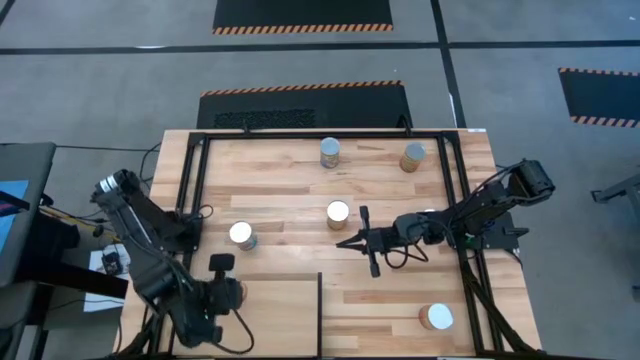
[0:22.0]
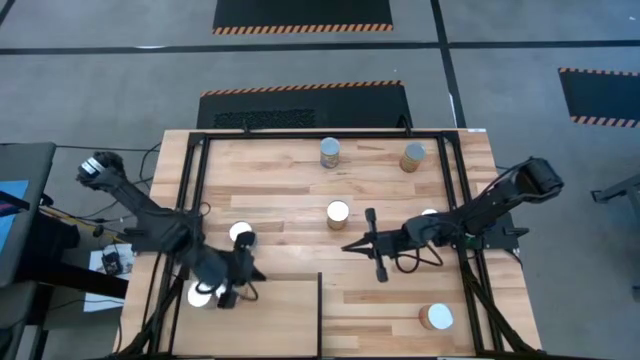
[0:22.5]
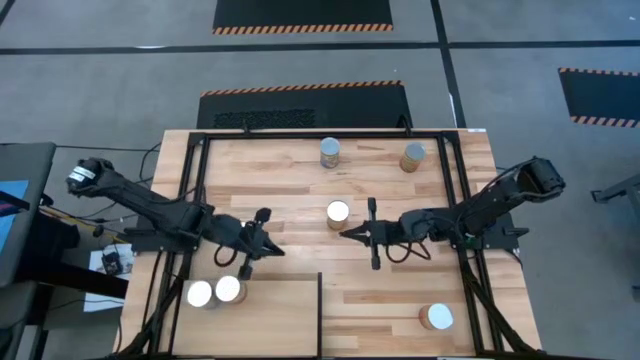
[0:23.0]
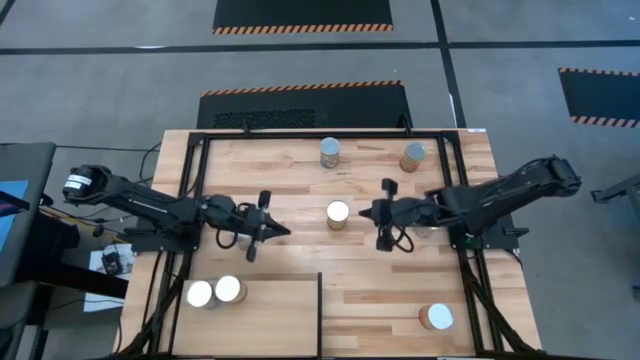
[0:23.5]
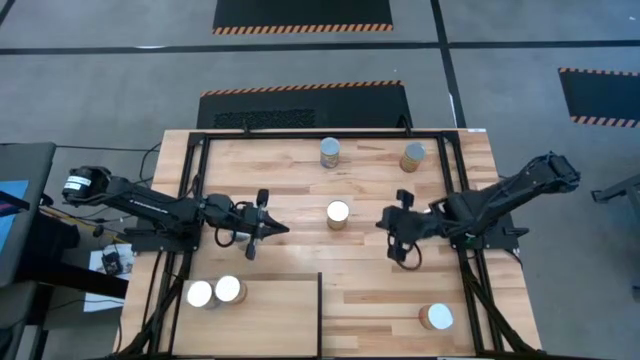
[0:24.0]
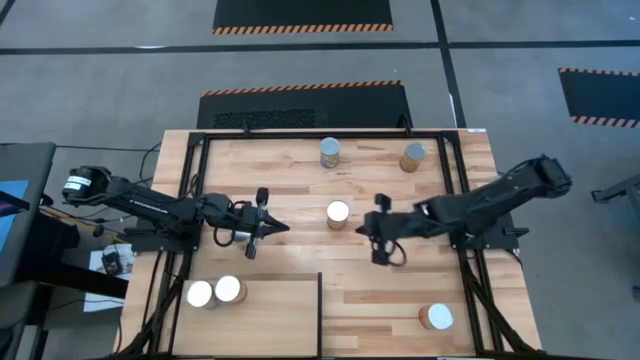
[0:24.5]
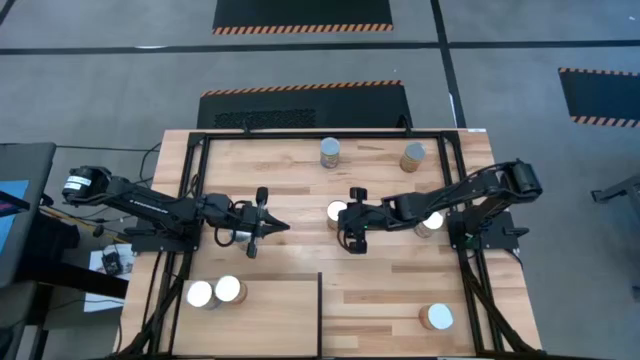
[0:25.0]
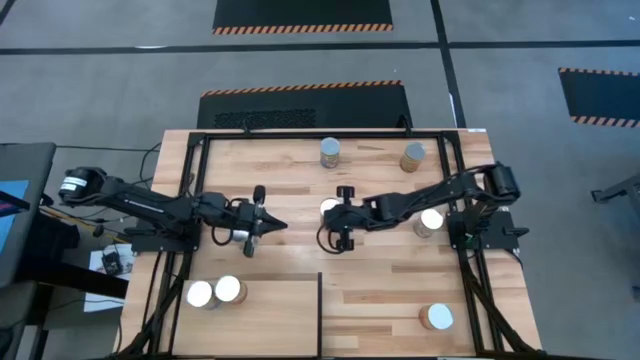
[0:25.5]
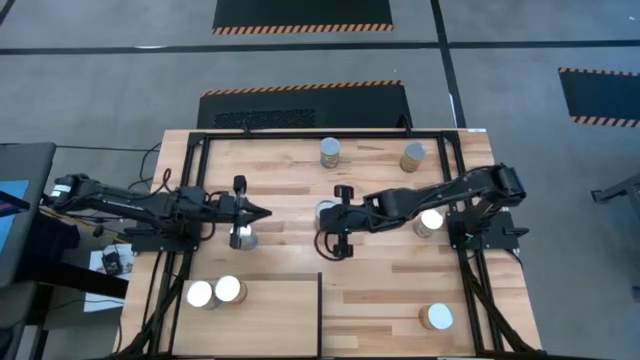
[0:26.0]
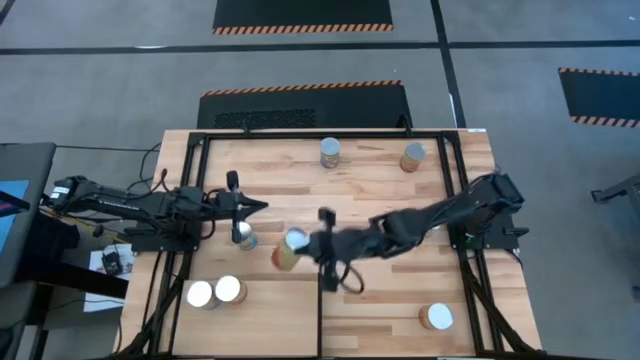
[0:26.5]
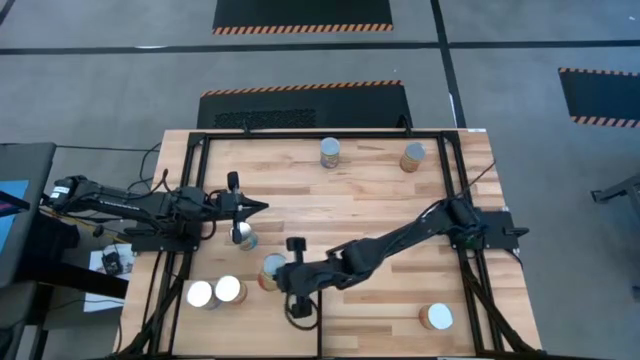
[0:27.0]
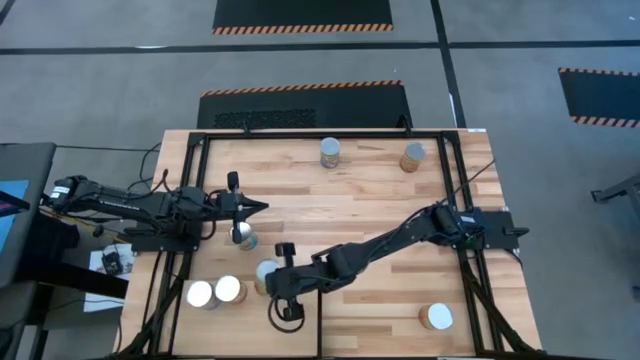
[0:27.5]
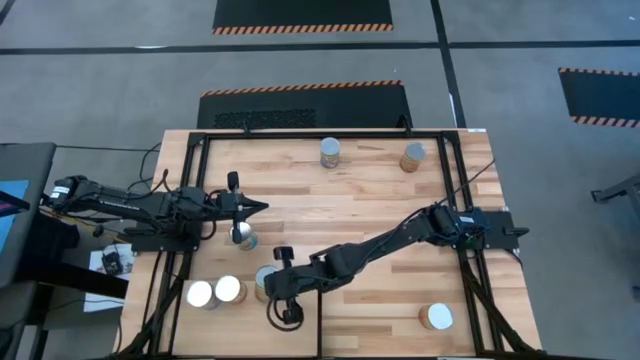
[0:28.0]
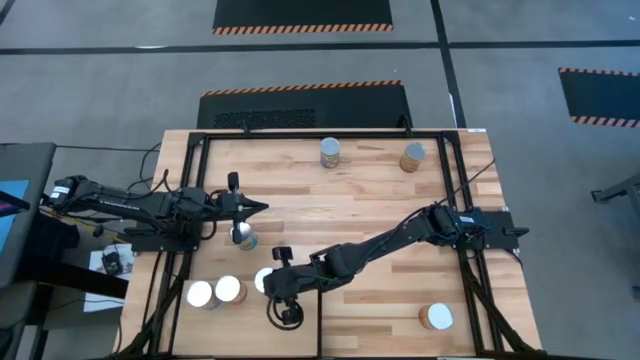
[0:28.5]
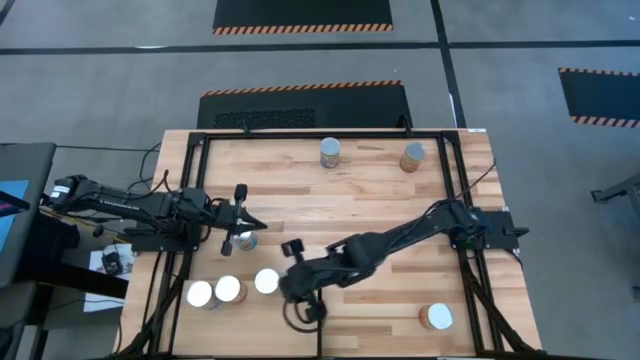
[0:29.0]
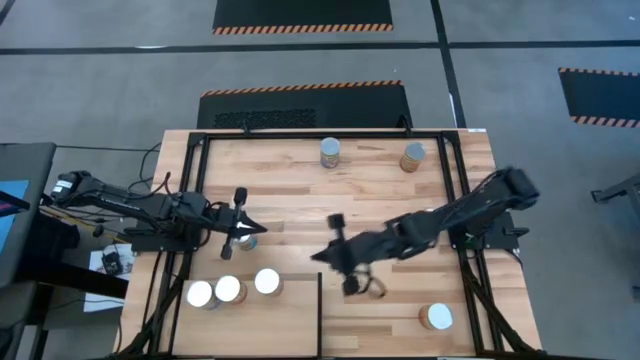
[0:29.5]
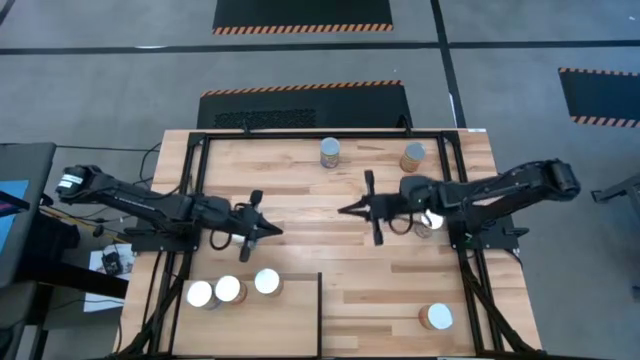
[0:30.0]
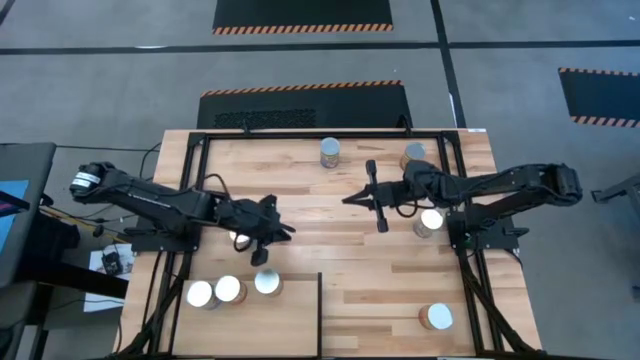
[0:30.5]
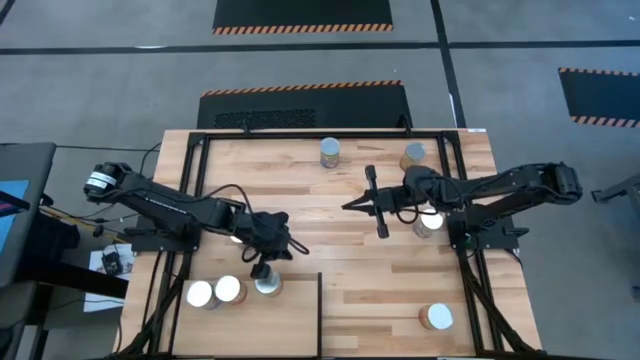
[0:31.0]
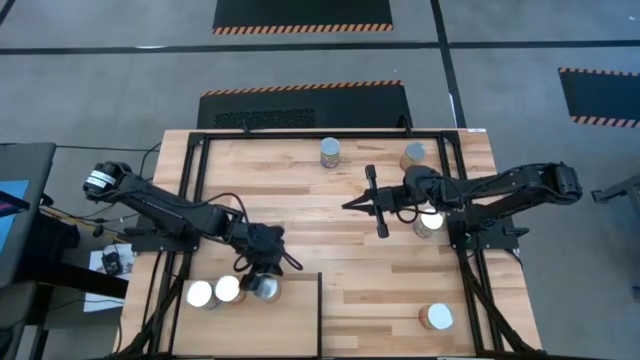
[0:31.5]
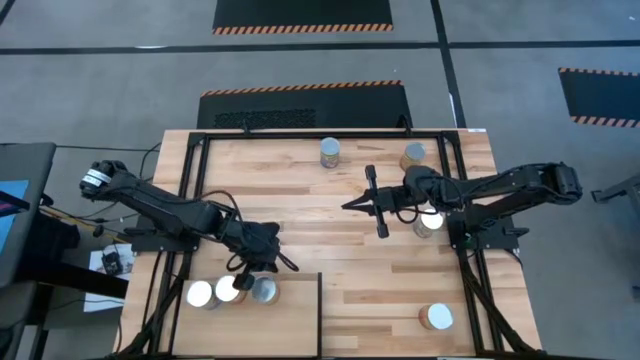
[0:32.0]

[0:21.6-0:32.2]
Task: Pick and place cans onto a shelf
Put the bottom green beans on the shelf

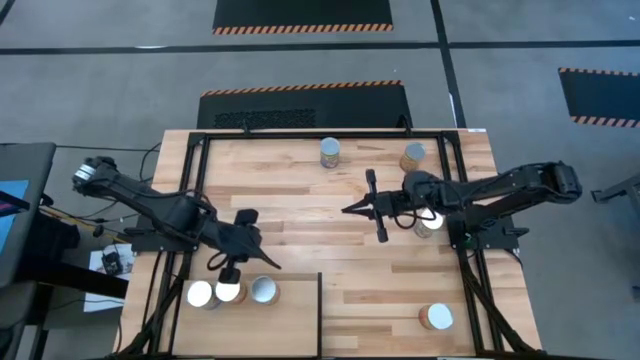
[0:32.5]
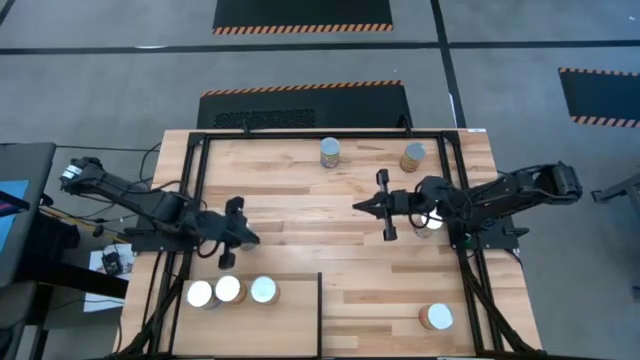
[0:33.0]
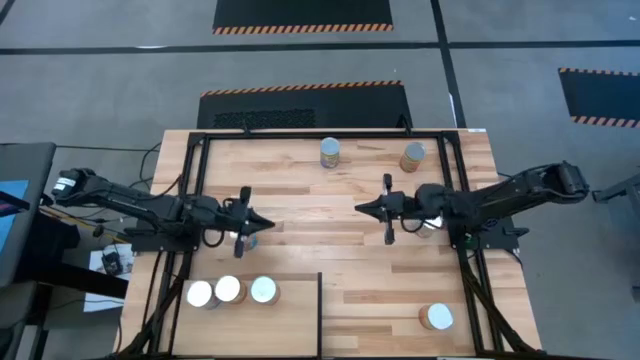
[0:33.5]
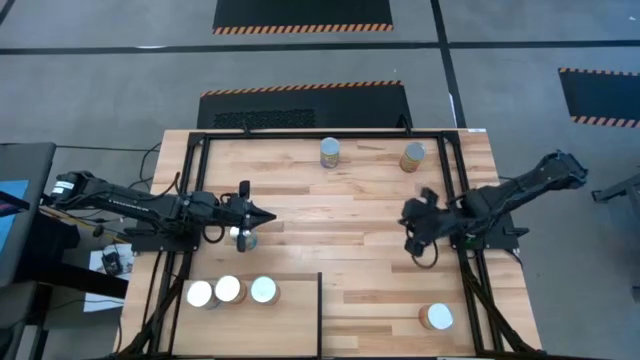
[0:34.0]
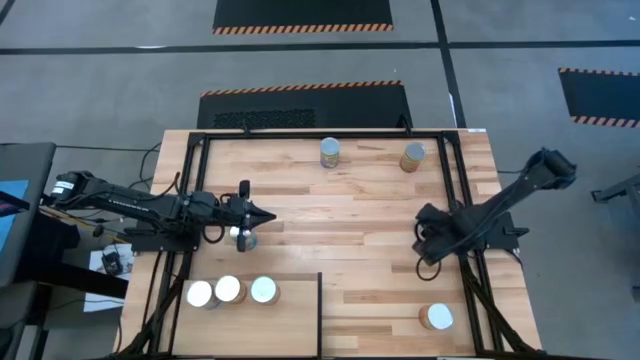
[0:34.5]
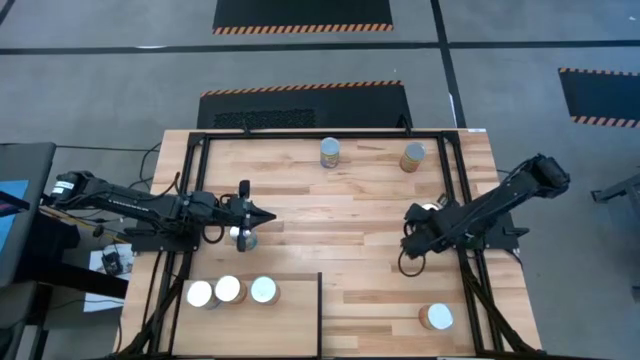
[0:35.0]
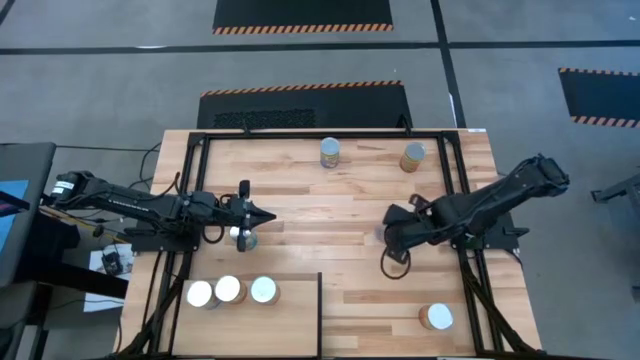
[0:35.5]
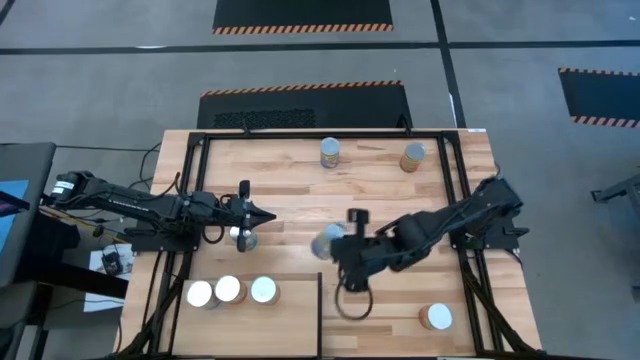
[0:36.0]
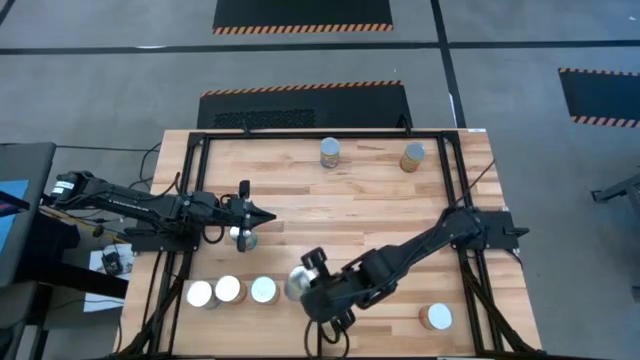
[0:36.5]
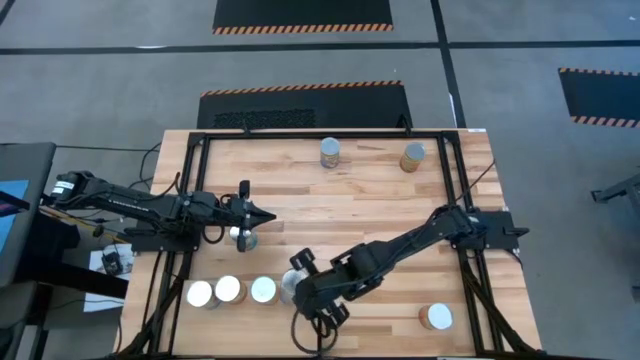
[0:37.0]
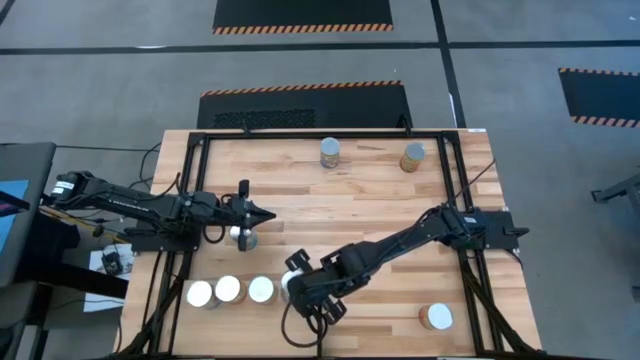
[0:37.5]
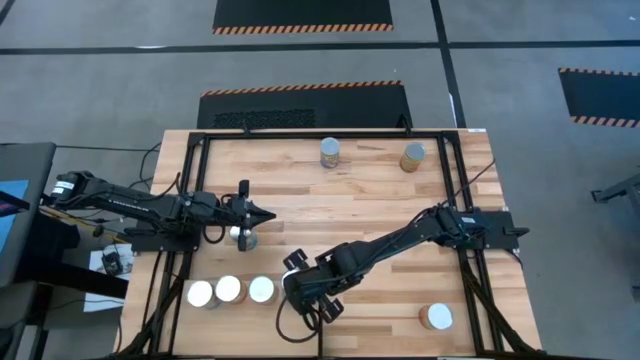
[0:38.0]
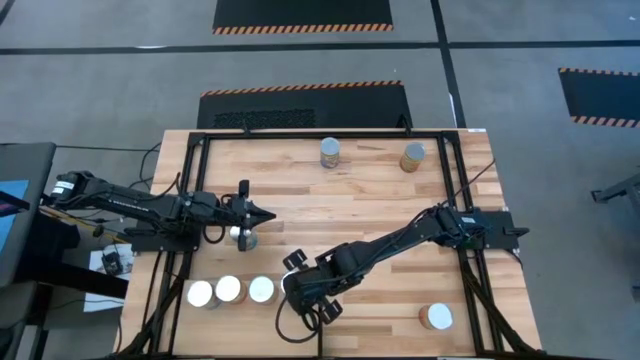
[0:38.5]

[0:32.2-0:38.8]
Put the right canned peaches on the shelf

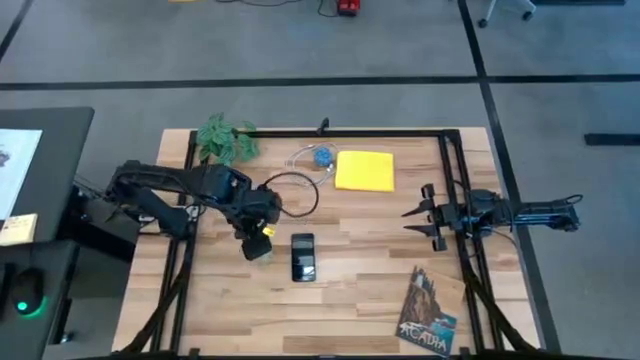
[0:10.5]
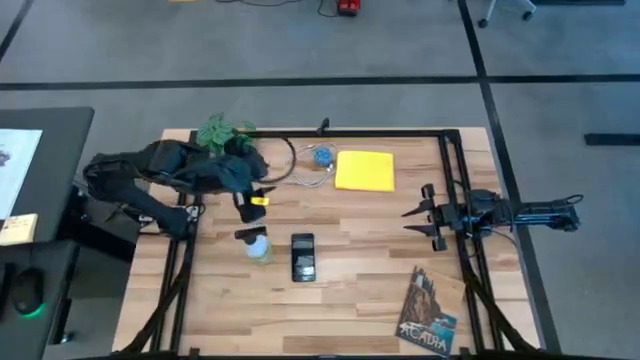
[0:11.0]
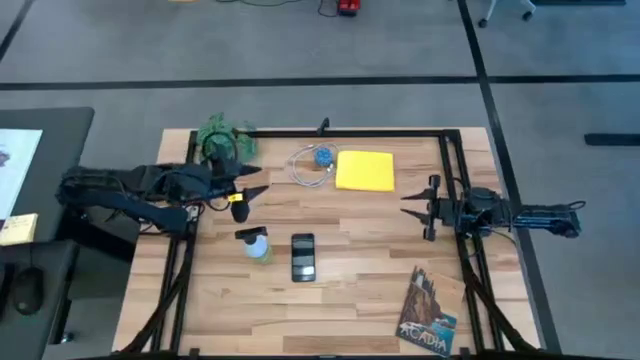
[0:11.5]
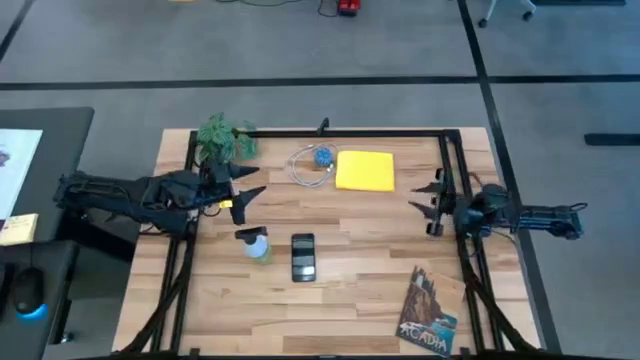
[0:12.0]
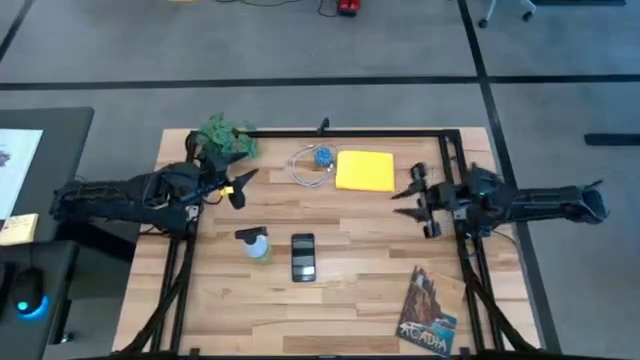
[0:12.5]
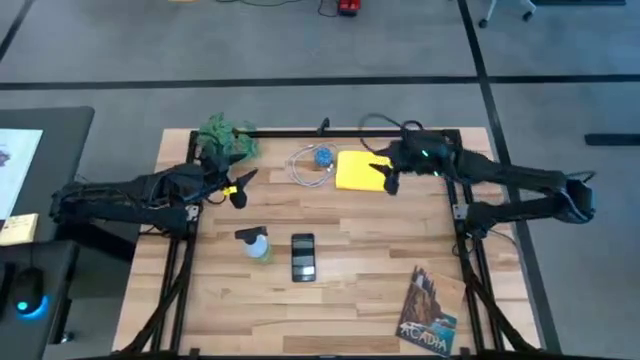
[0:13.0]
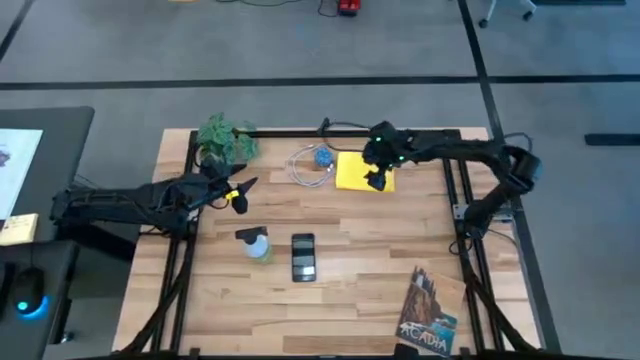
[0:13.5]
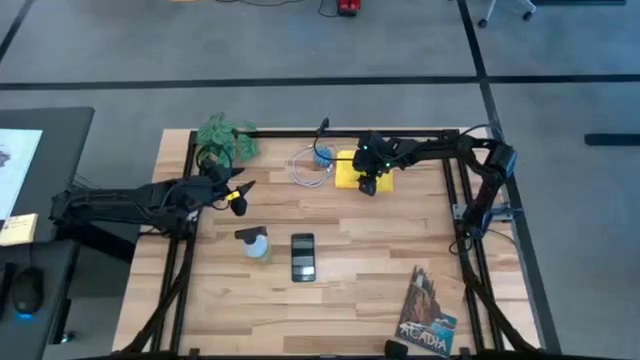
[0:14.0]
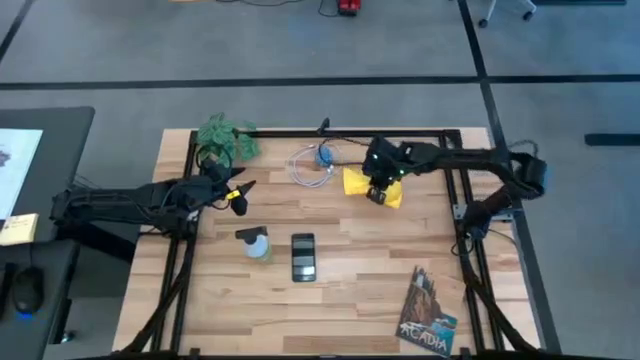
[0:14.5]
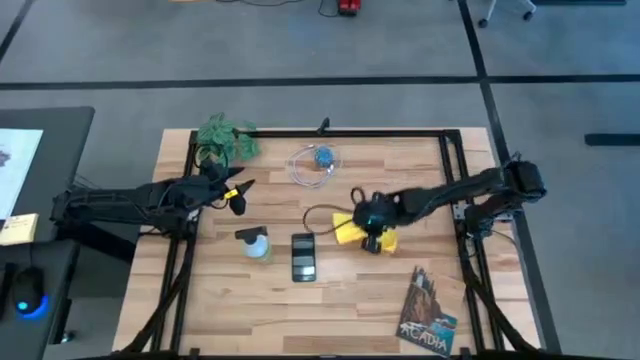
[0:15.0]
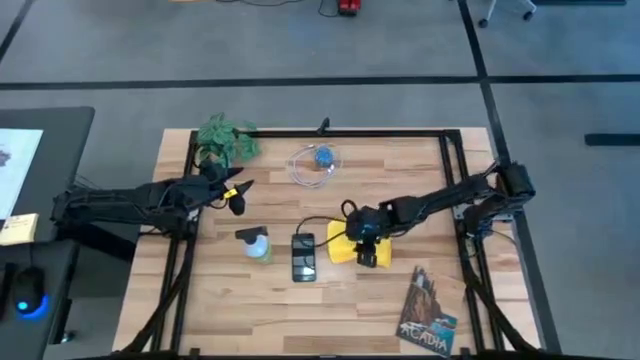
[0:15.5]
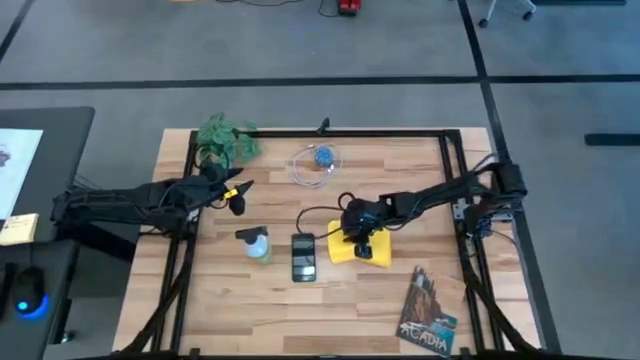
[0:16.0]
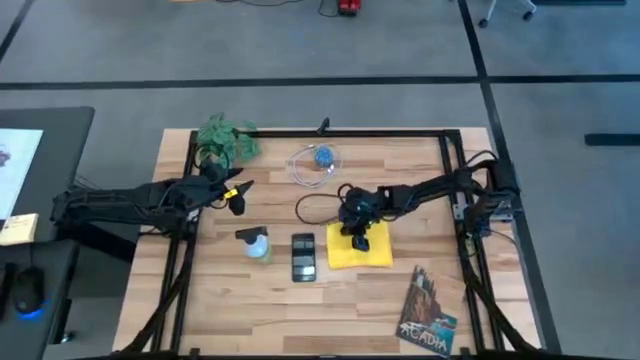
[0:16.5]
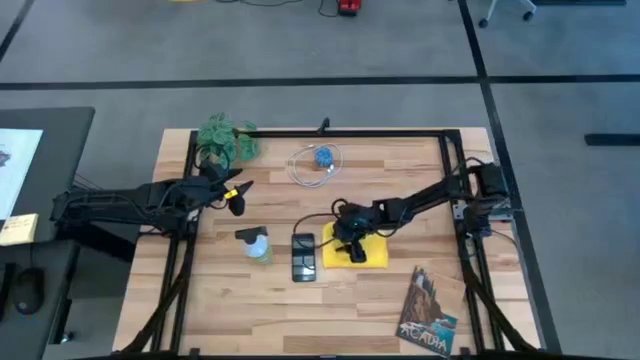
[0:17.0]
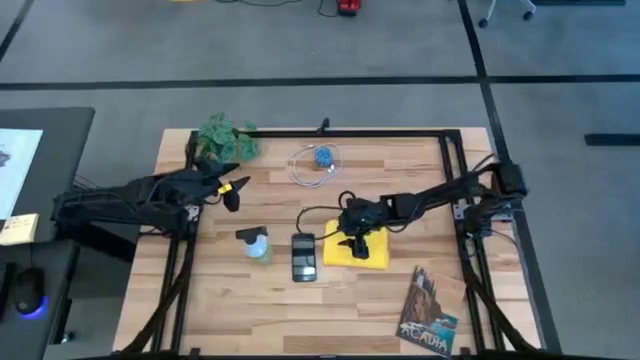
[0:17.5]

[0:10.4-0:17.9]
Task: Apply microfiber cloth
Move the microfiber cloth to the center of the table
